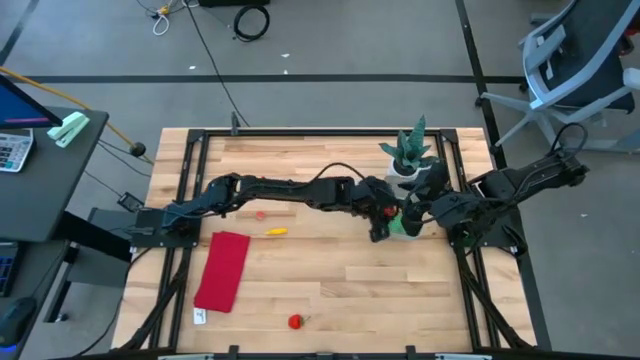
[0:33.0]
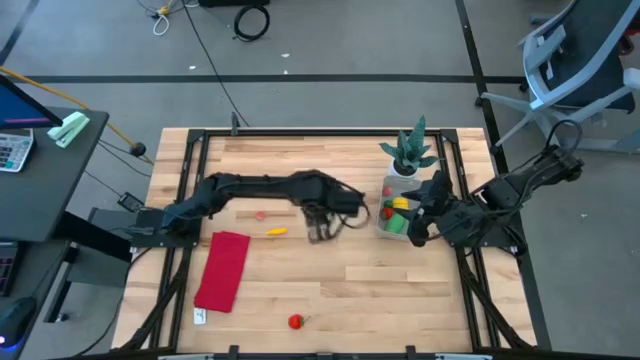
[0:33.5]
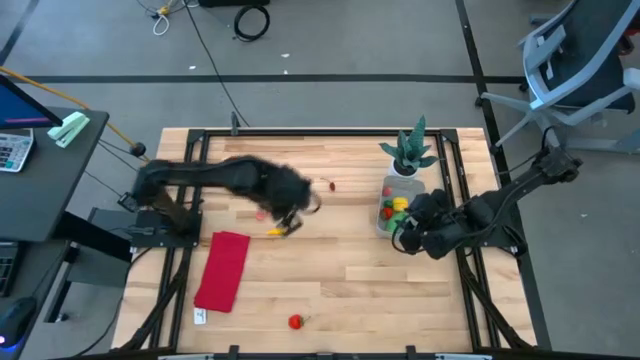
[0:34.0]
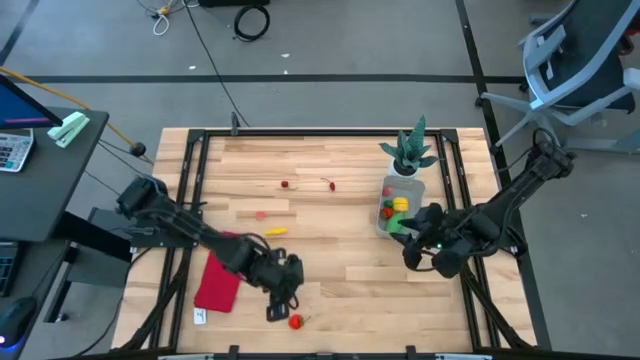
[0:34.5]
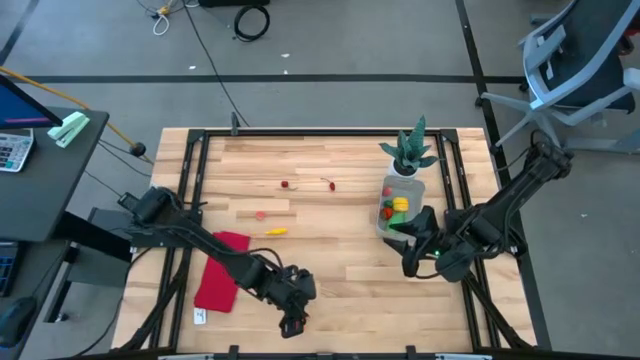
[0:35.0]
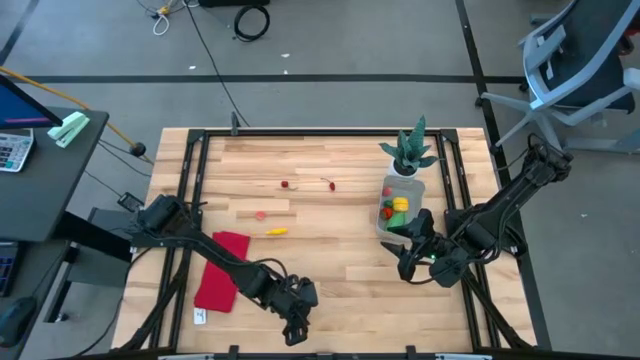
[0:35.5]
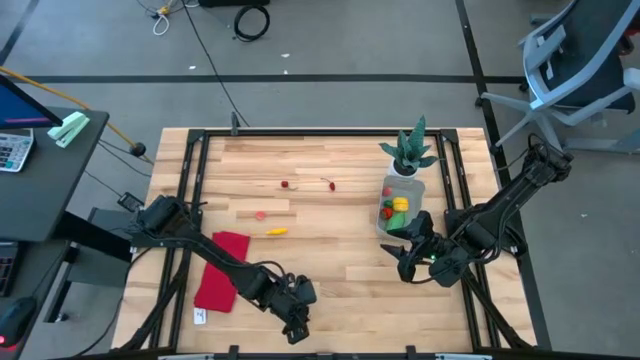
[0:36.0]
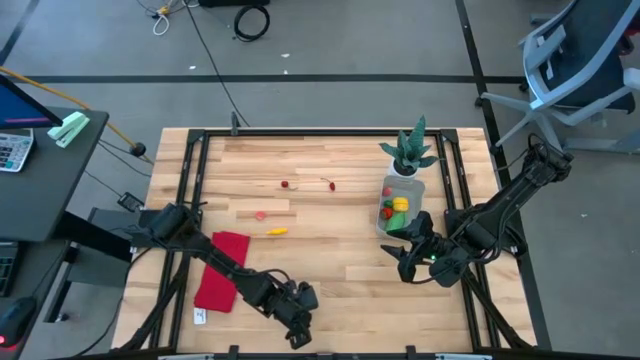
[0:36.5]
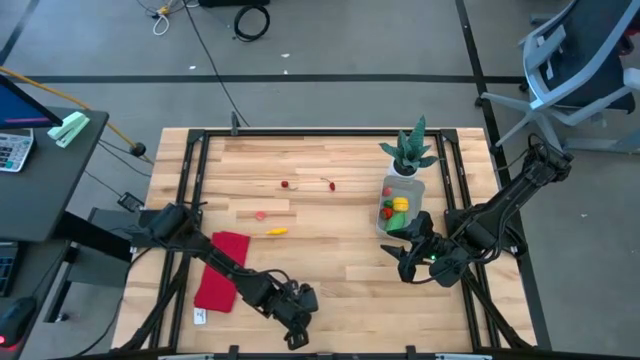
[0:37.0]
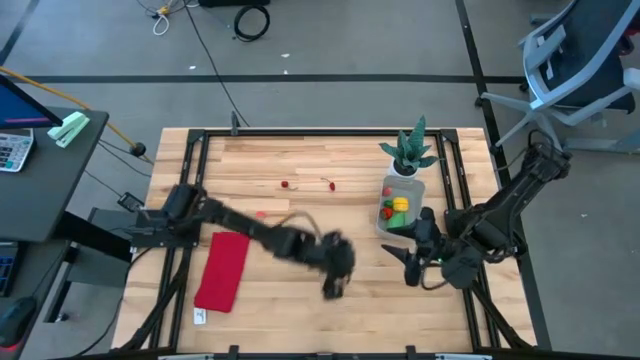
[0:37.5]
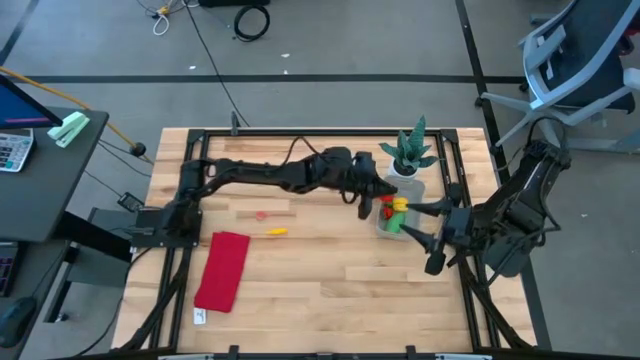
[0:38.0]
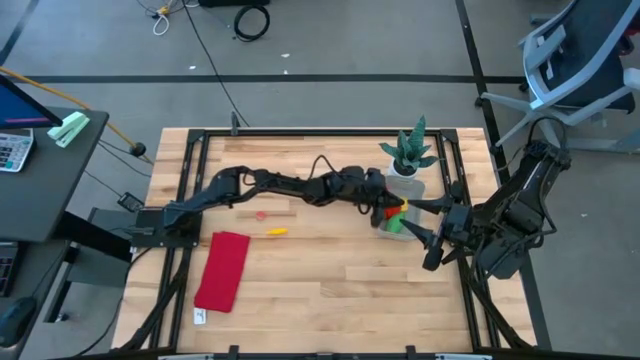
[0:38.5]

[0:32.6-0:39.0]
Task: Pick and placing Produce into tupperware
Put the strawberry into the bin

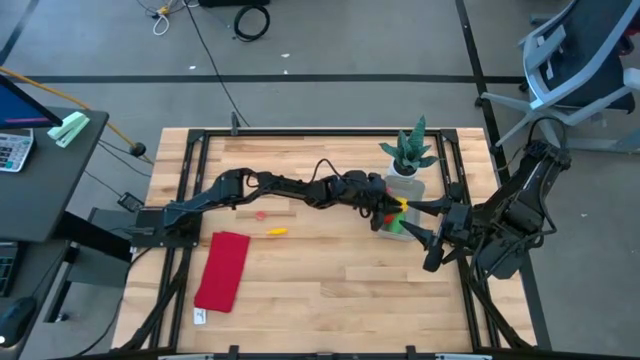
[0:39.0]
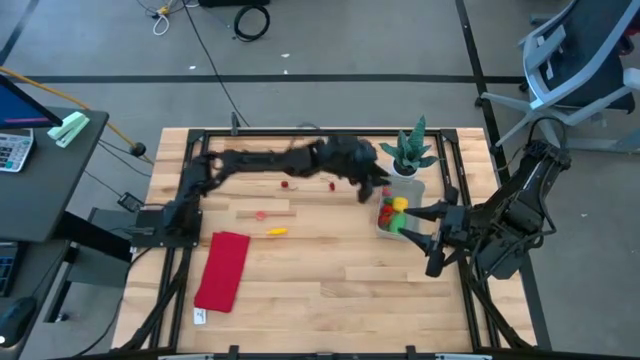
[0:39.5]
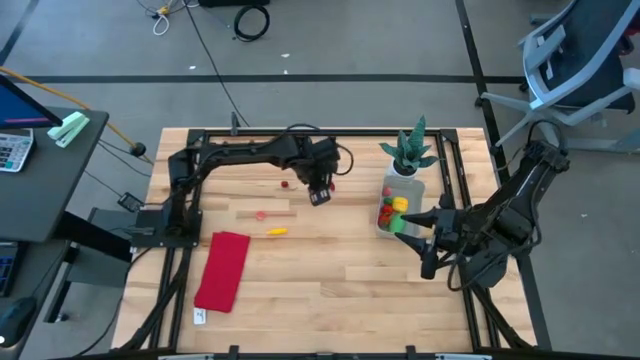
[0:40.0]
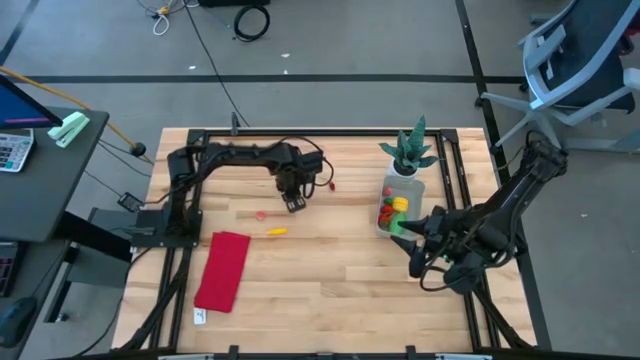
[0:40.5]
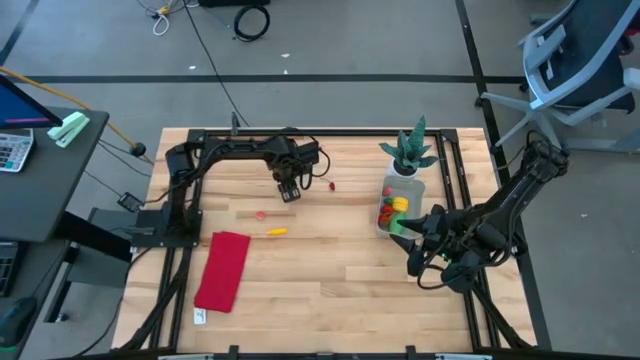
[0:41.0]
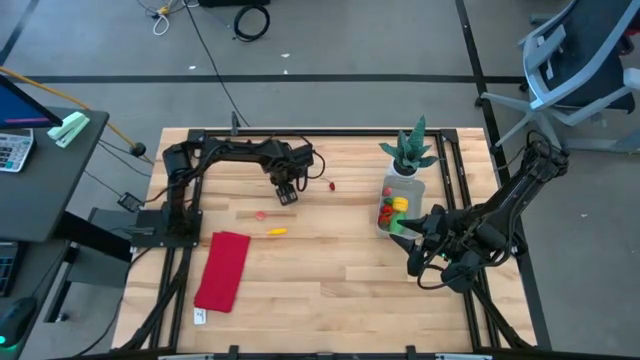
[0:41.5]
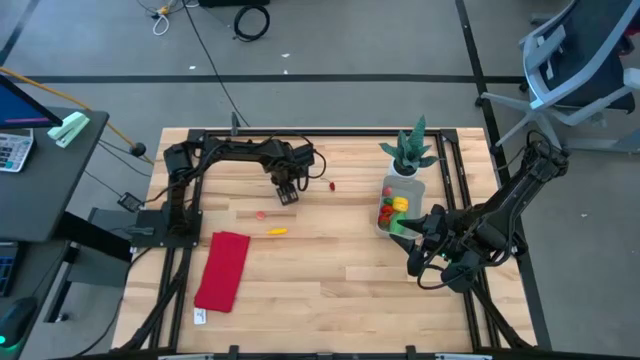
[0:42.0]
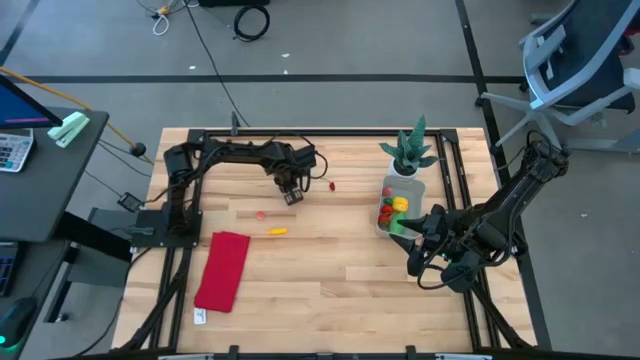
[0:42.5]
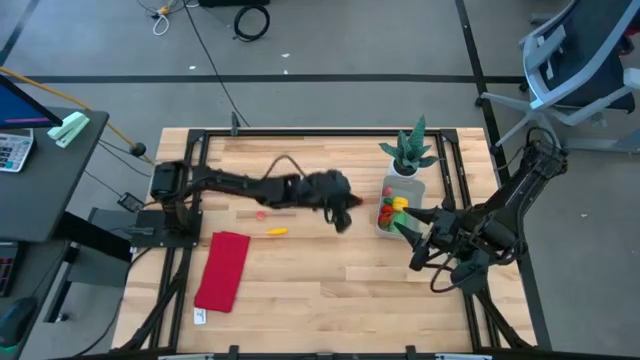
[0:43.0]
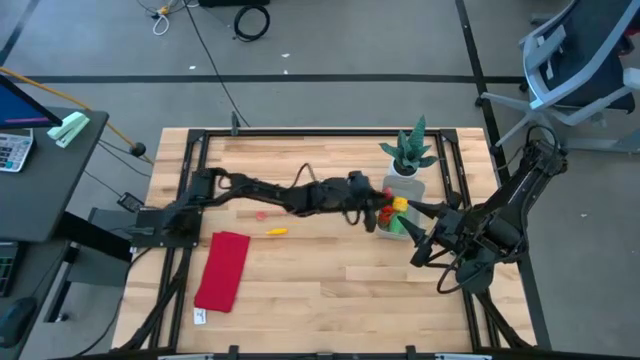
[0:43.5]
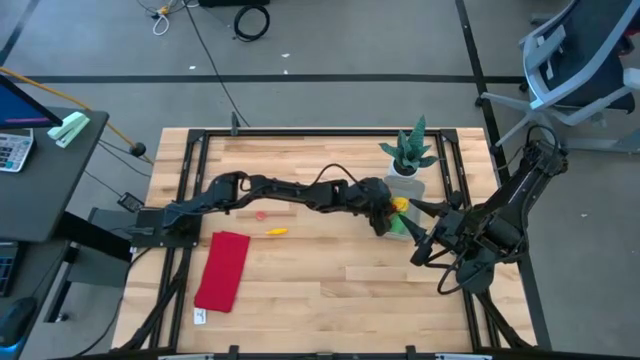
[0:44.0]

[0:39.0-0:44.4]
Put the left red cherry into the bin

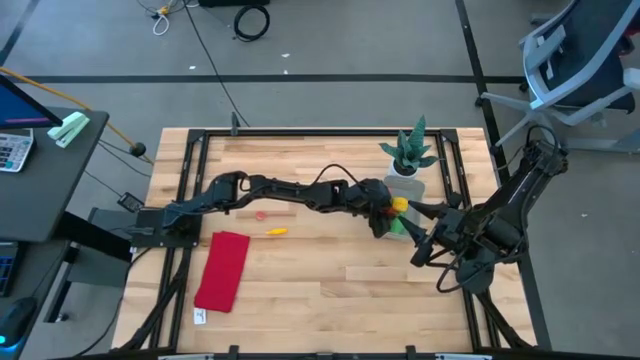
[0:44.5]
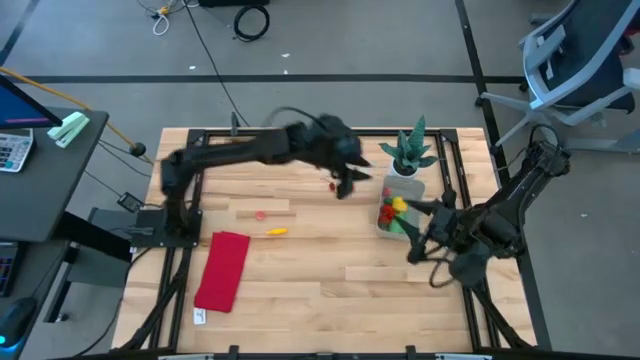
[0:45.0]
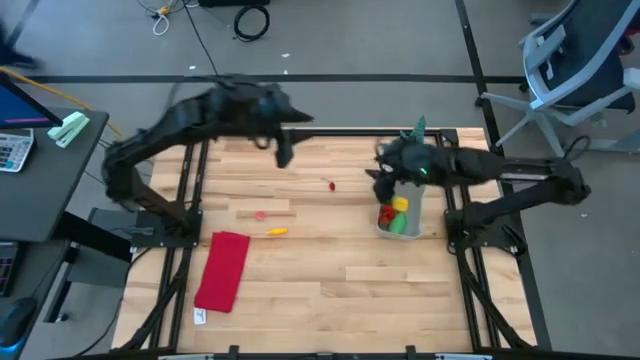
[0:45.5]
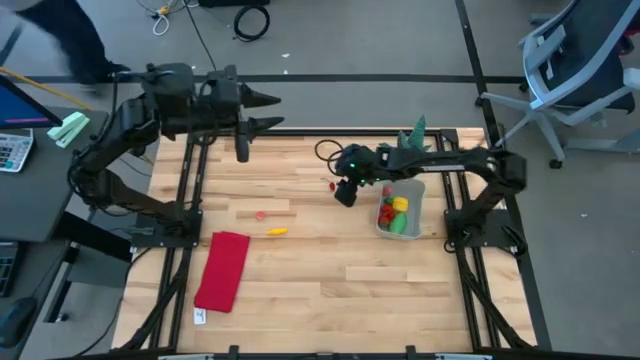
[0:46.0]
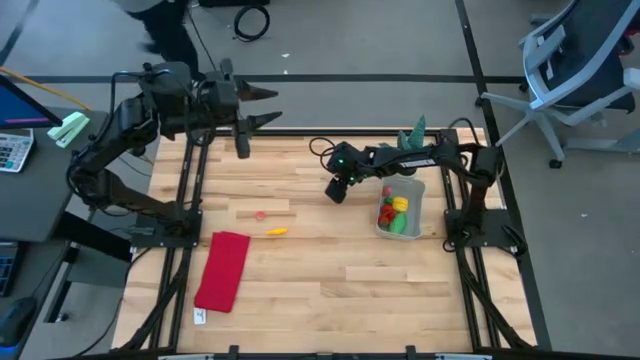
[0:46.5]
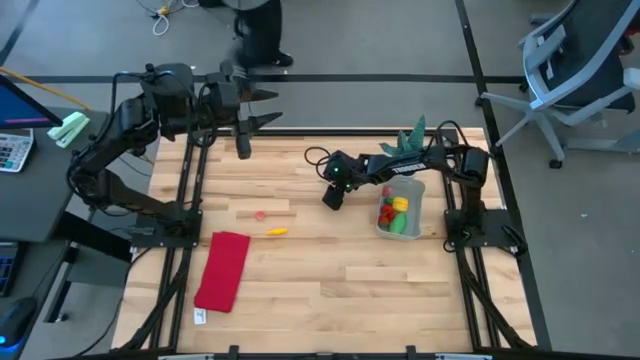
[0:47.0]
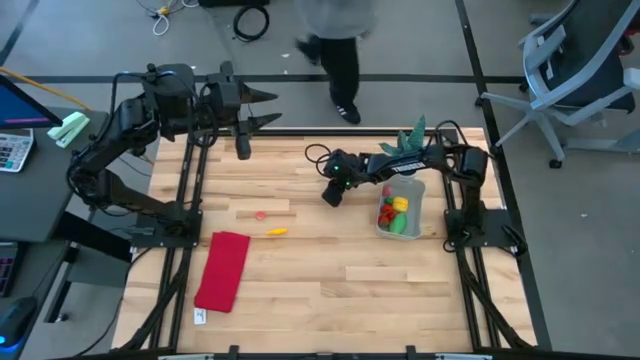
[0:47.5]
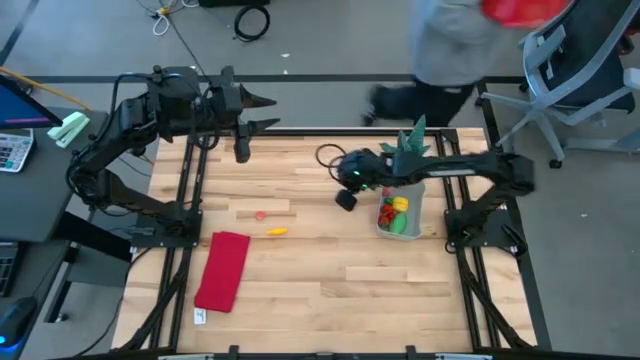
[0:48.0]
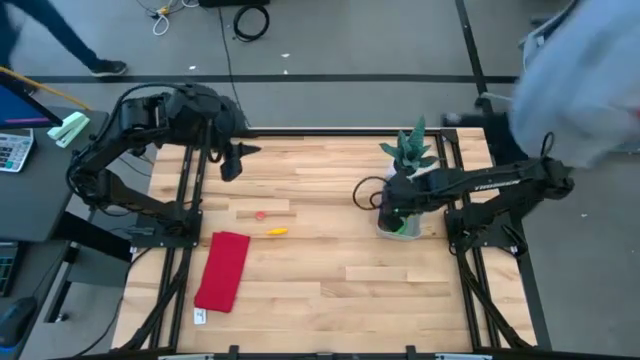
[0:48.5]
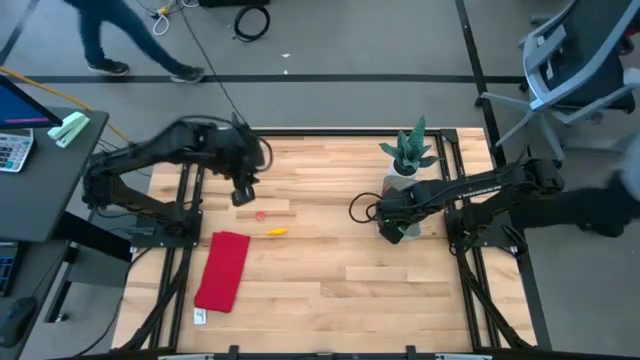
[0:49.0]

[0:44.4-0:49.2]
Put the red cherry into the bin

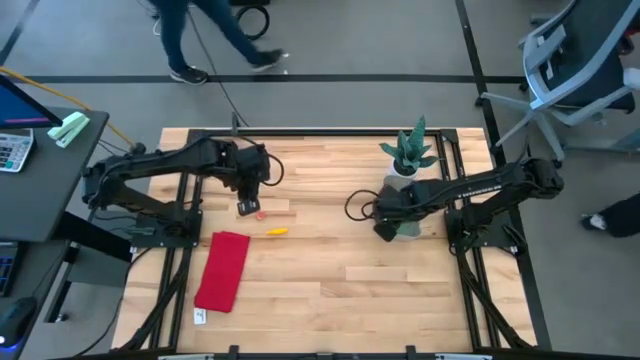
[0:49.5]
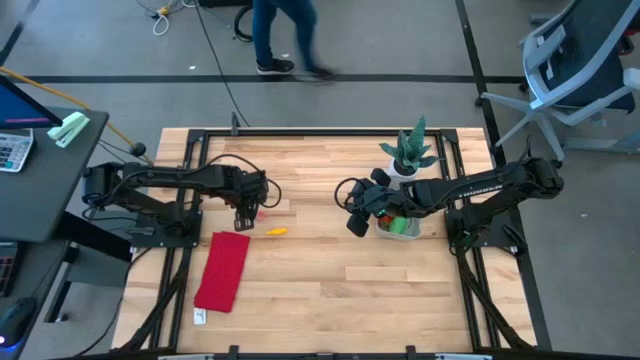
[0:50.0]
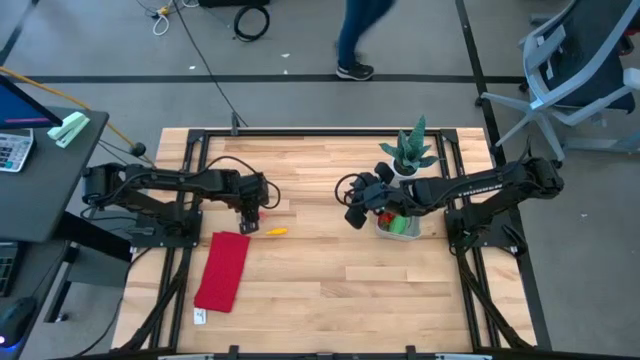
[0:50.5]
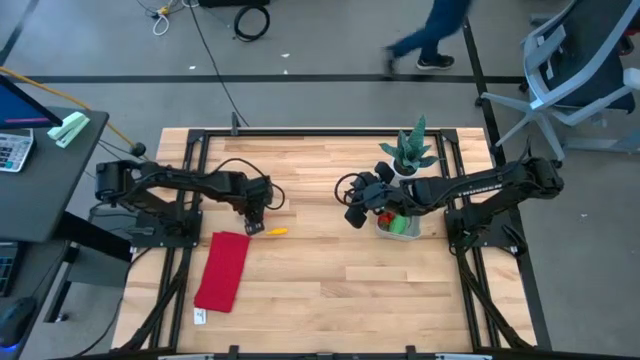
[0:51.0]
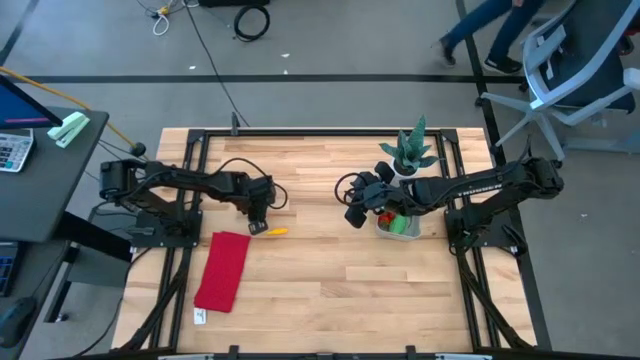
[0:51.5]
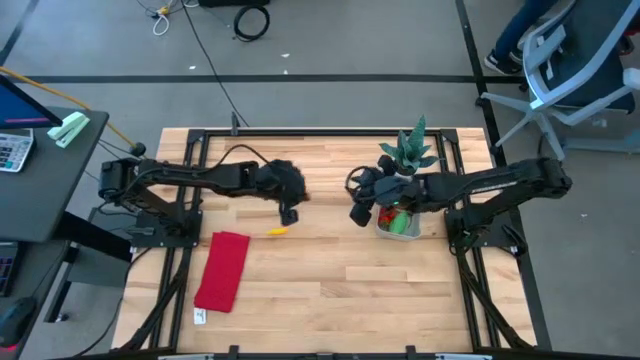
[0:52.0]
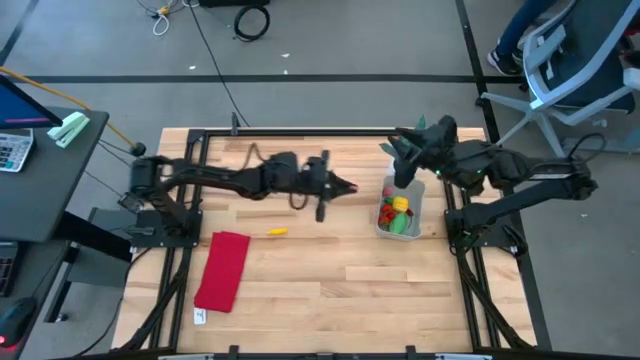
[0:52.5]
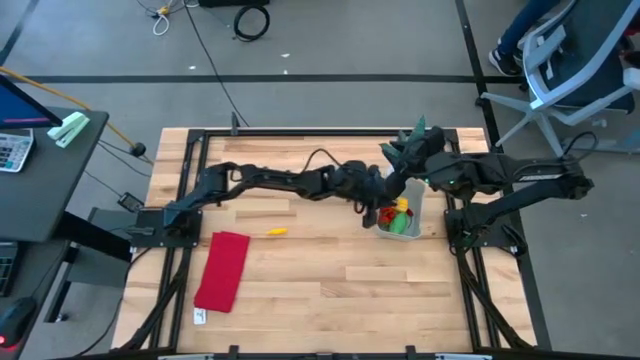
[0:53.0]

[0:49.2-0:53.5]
Put the peach into the bin

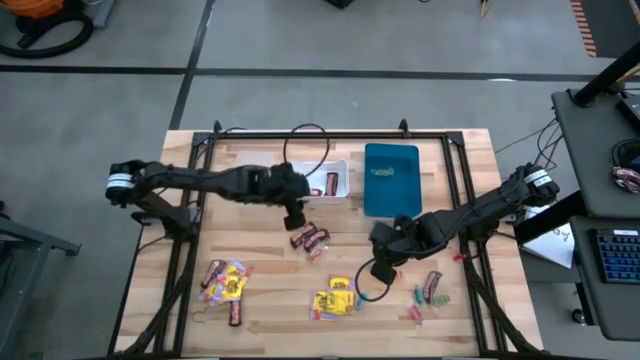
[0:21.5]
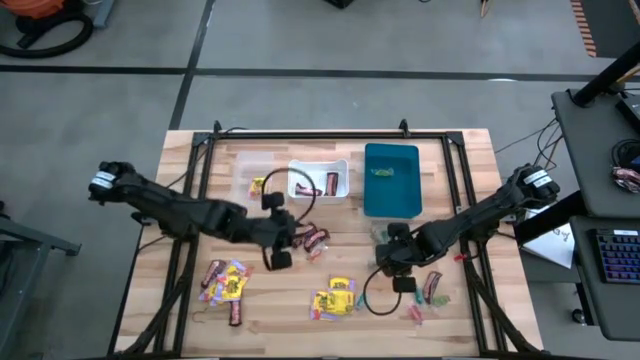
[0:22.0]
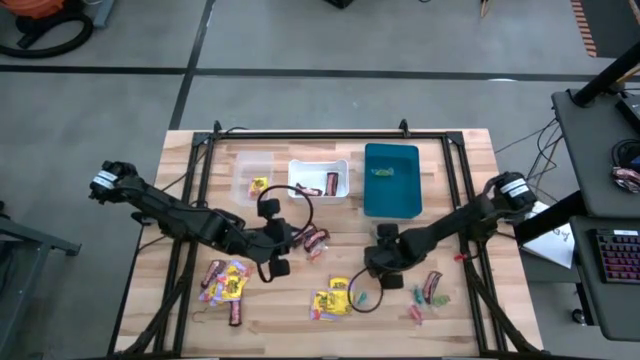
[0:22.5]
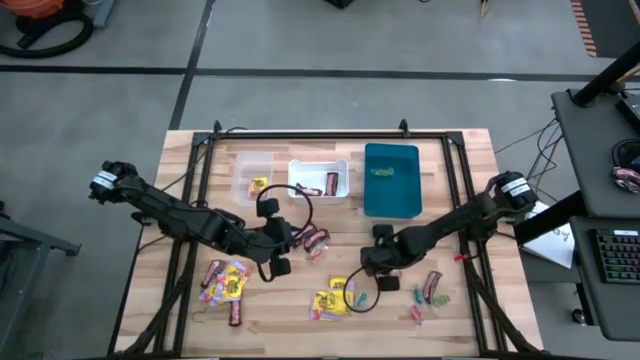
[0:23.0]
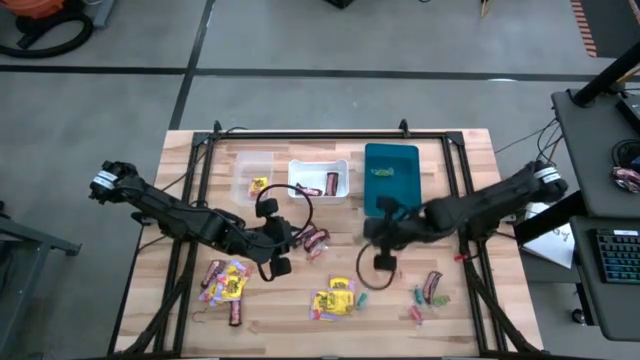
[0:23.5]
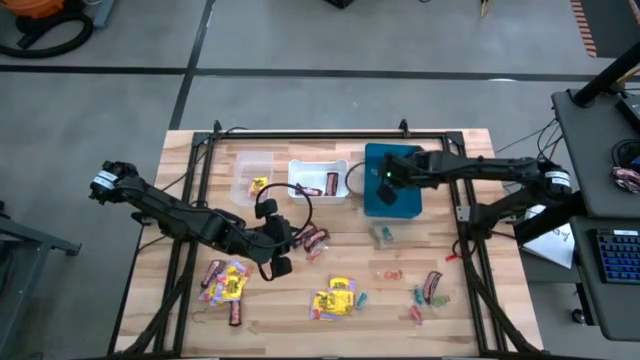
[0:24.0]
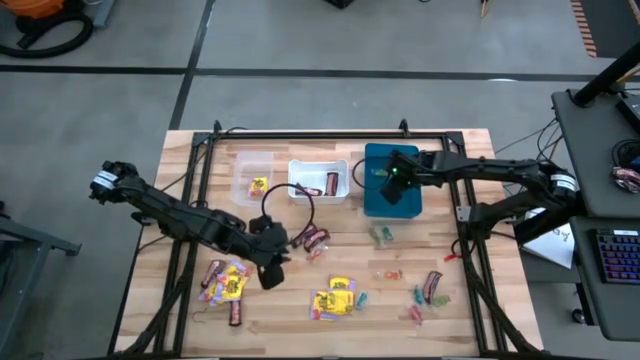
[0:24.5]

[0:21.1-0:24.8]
Task: Sort candy
Put the green candy into the blue bin
